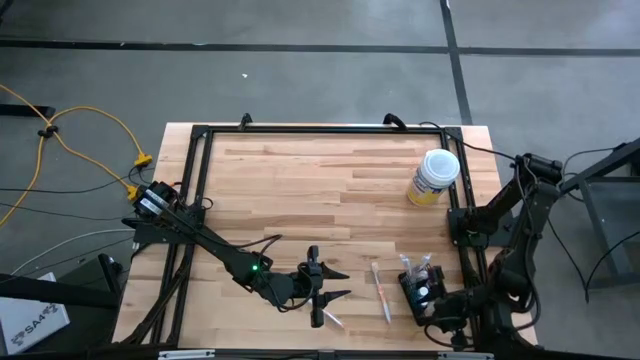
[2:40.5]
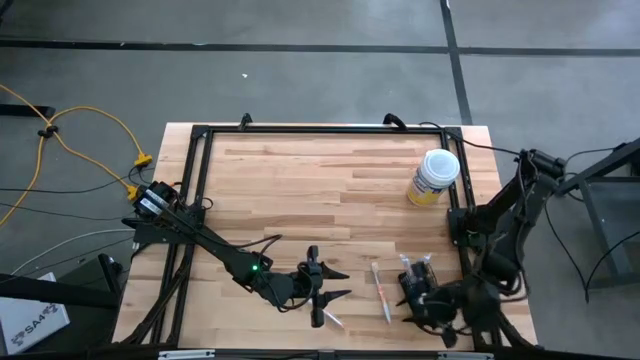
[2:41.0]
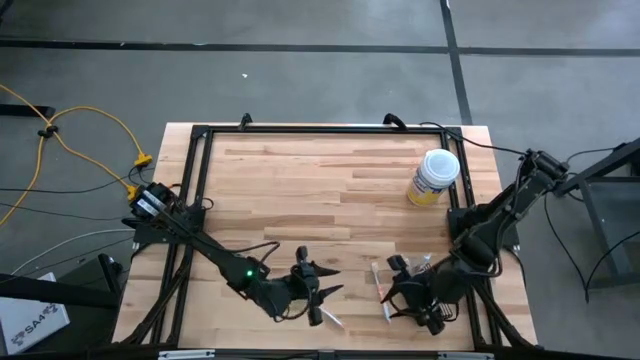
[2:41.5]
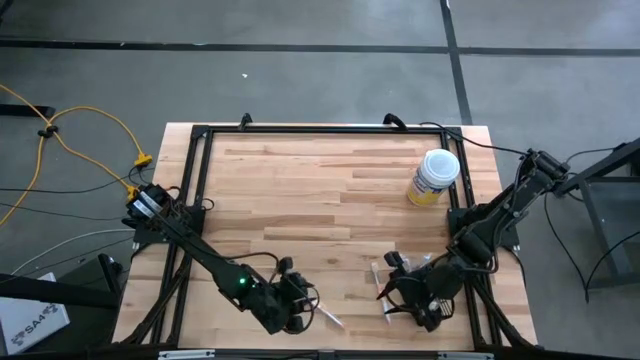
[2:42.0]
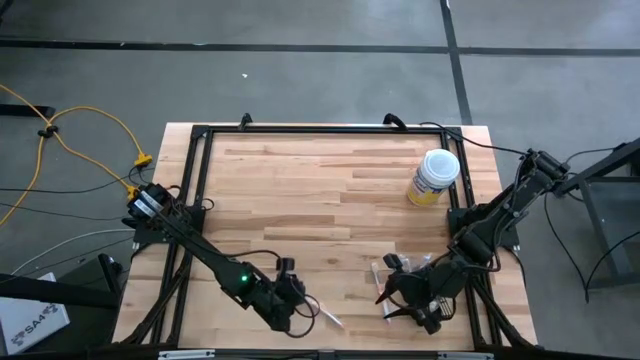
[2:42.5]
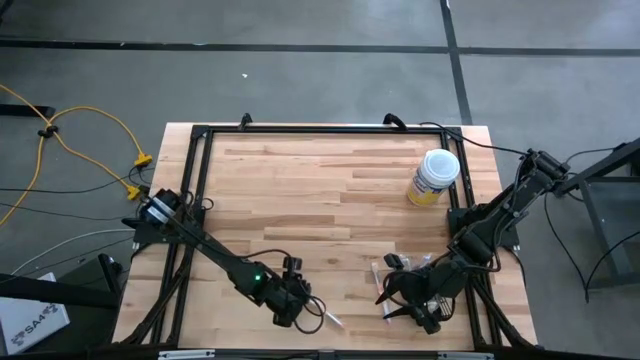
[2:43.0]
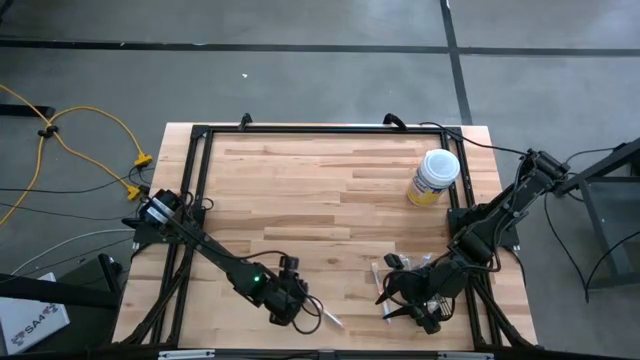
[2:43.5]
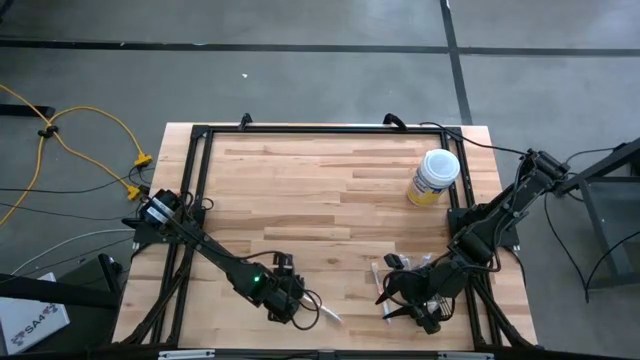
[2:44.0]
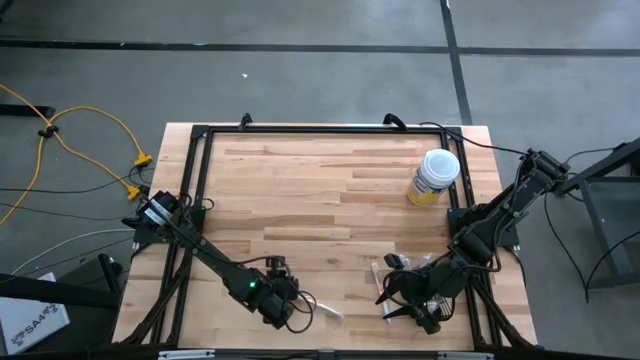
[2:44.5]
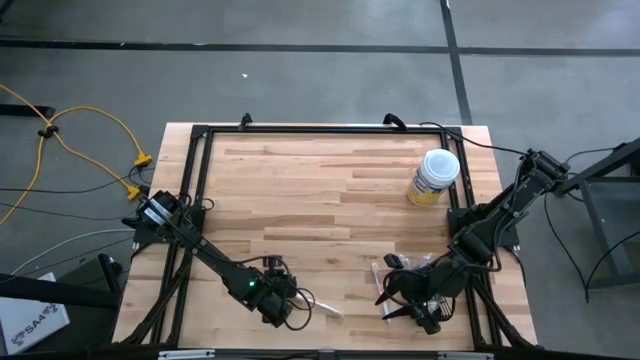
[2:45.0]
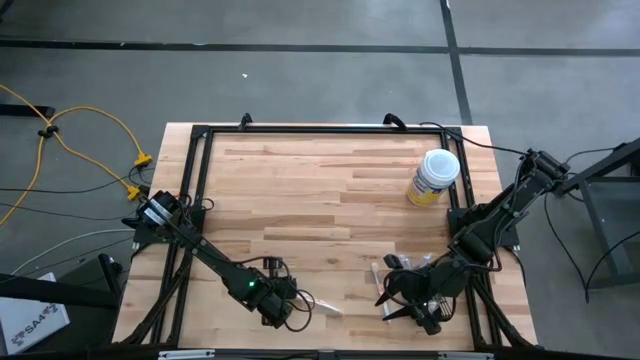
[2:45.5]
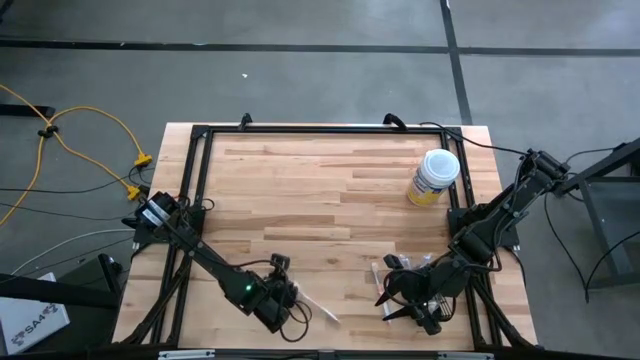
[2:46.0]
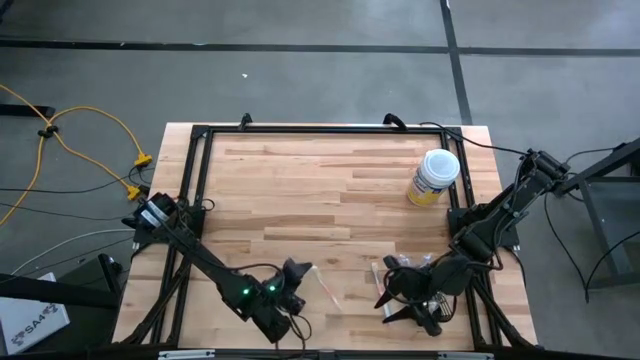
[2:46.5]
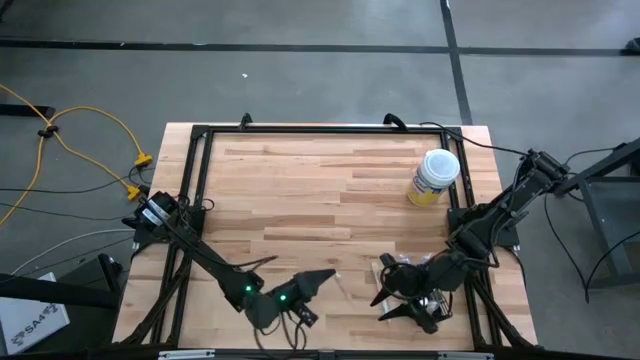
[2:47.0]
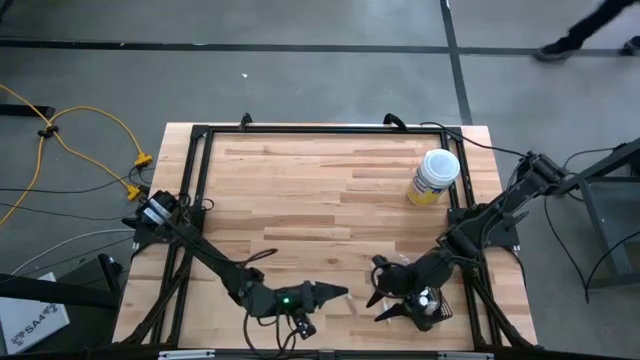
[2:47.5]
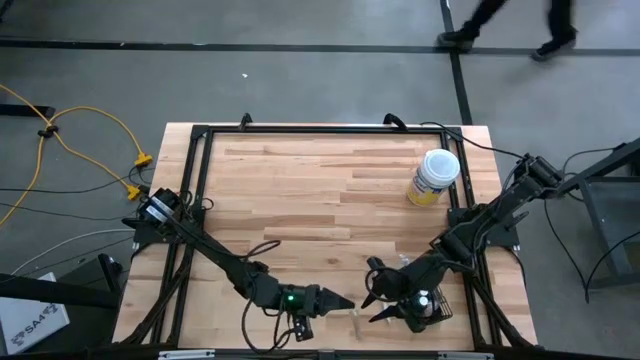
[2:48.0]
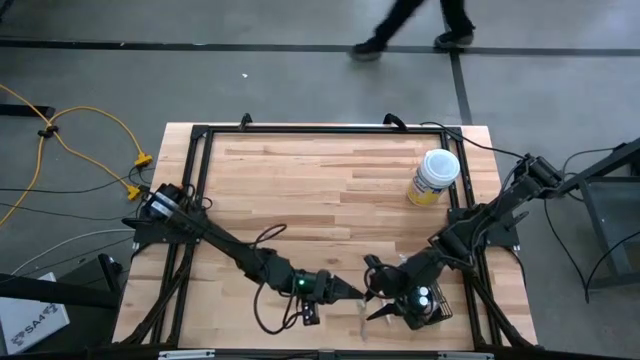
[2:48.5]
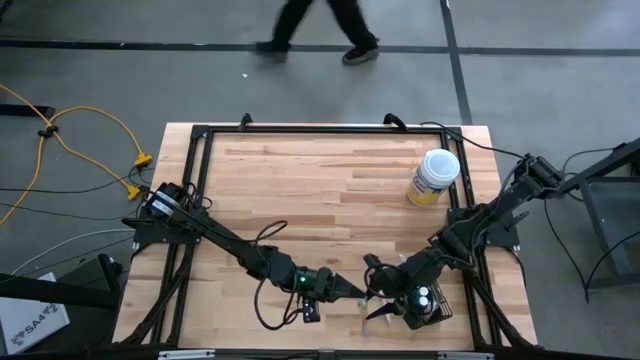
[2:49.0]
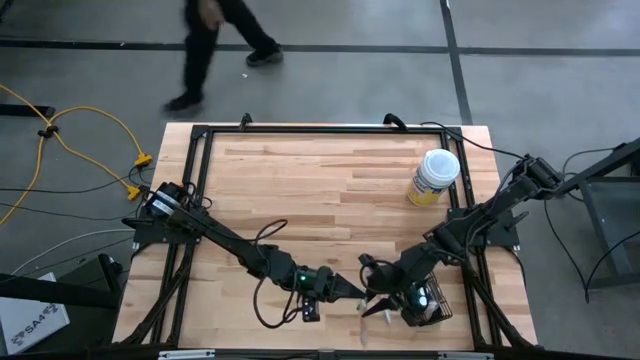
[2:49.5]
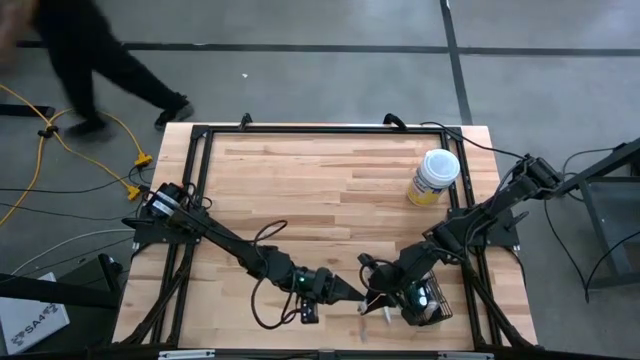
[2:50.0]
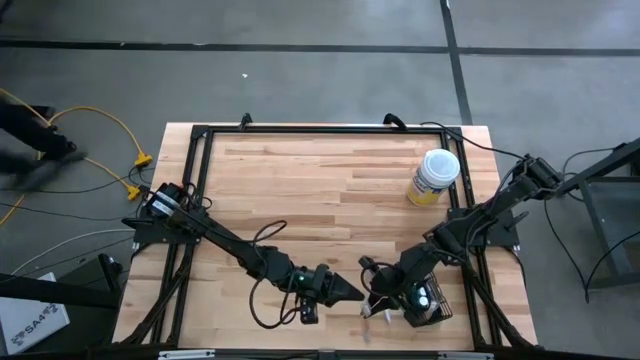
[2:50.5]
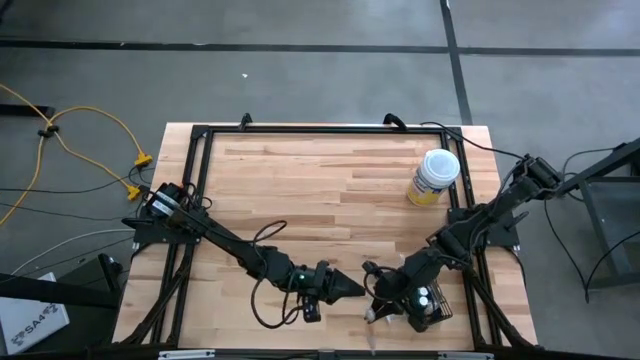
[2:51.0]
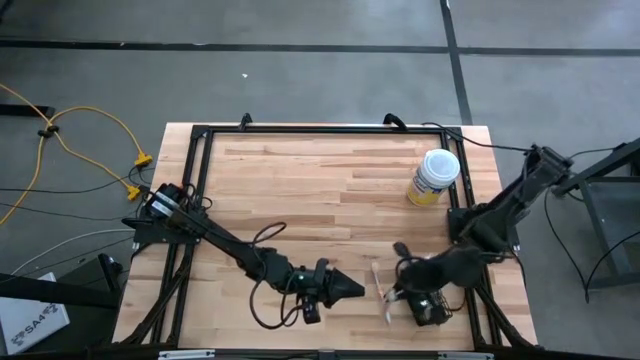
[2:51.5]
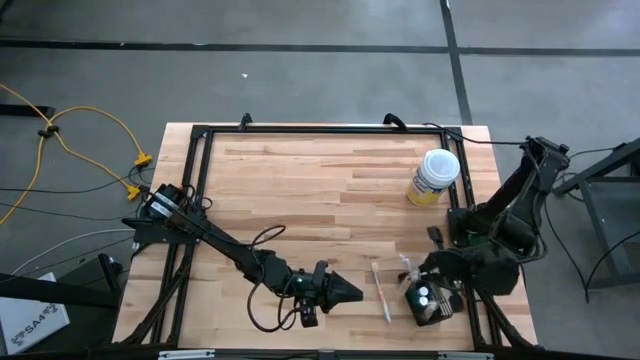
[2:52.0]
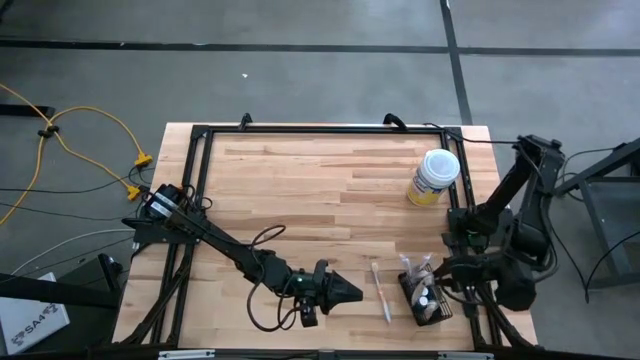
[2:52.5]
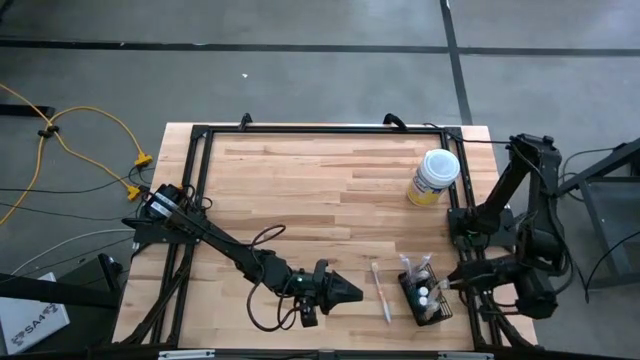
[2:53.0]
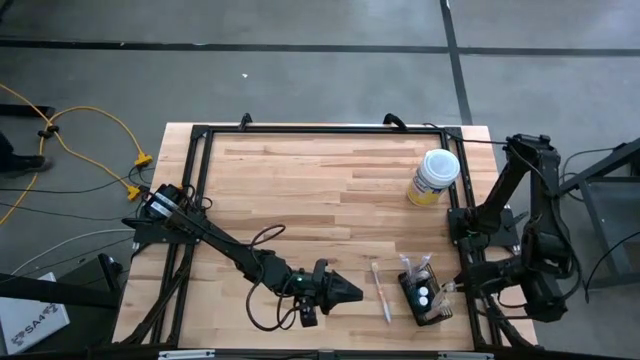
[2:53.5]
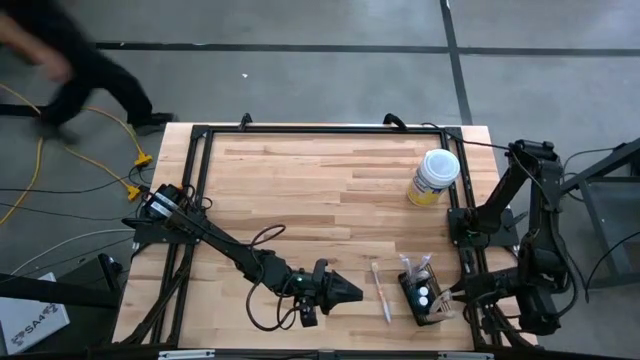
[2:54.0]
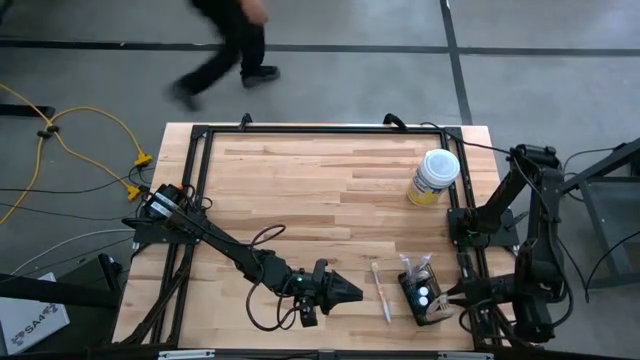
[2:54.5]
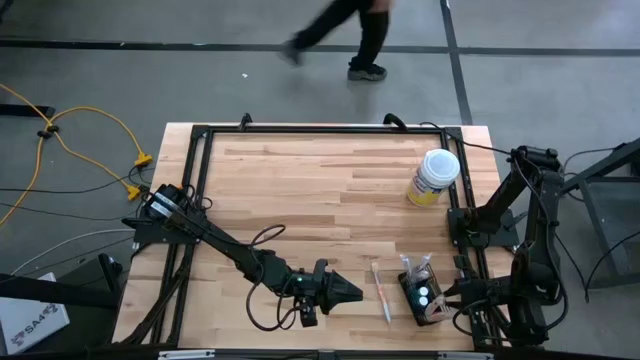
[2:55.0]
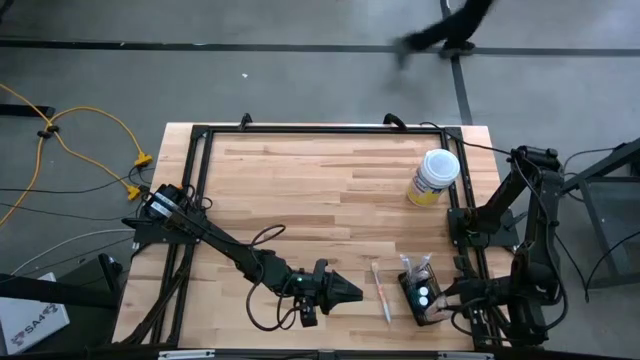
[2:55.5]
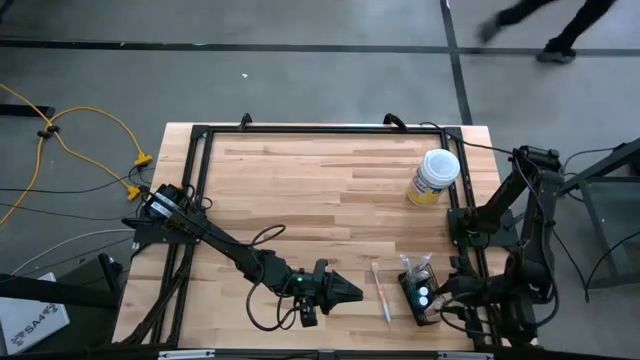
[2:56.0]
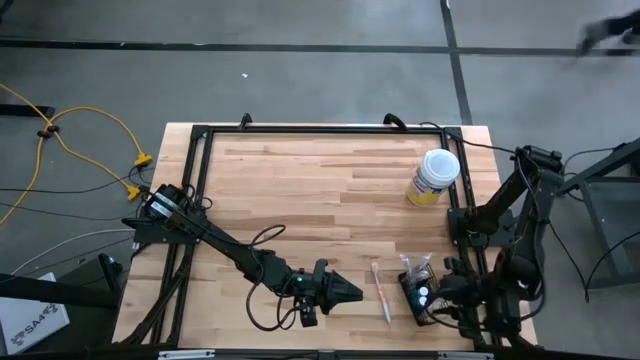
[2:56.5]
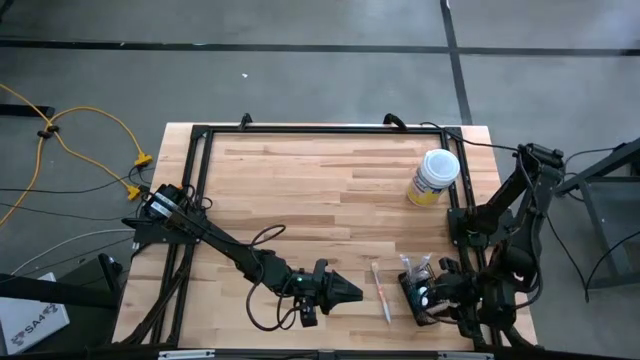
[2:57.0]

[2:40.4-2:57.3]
Task: Pick & Place toothbrushing station
Put the orange toothbrush into the mesh organizer
